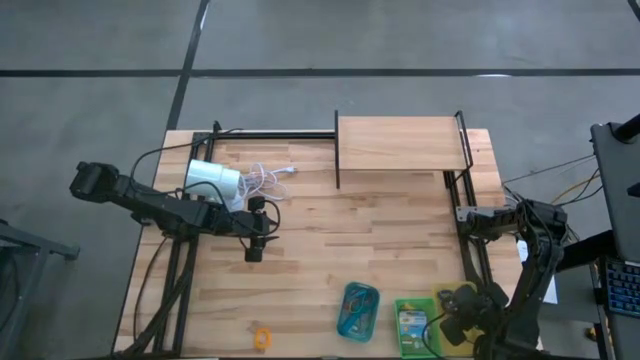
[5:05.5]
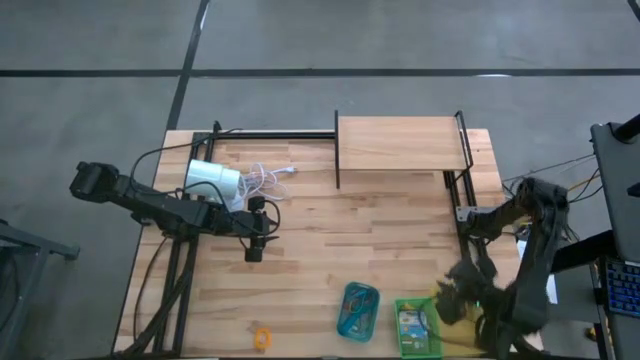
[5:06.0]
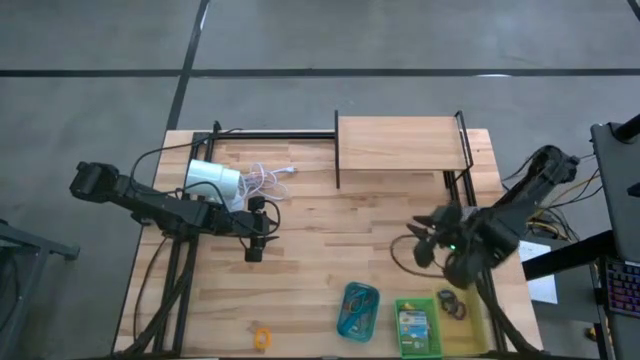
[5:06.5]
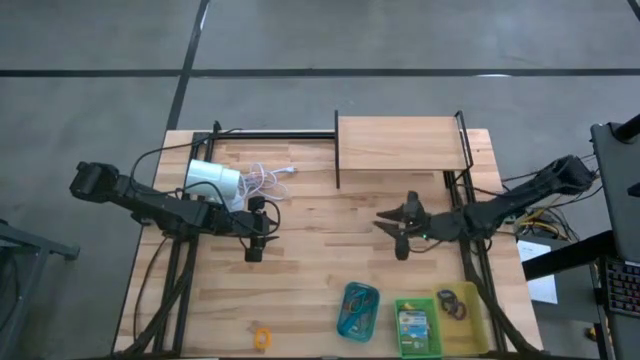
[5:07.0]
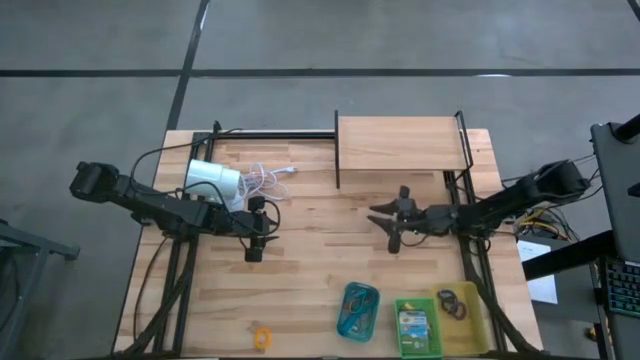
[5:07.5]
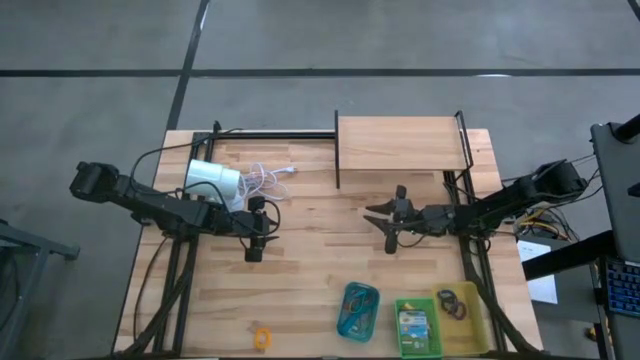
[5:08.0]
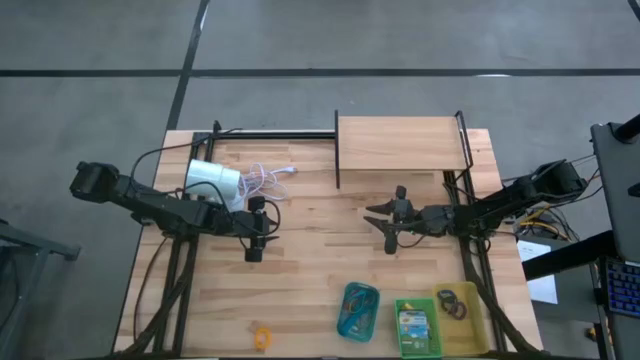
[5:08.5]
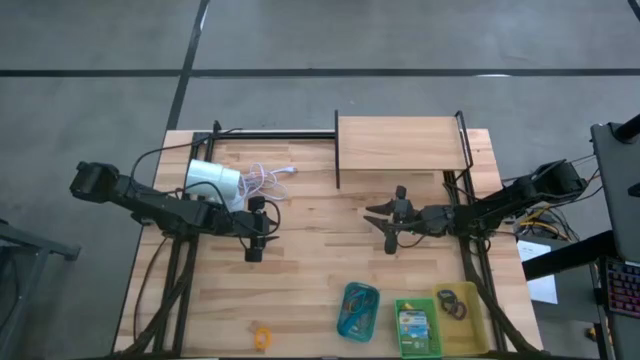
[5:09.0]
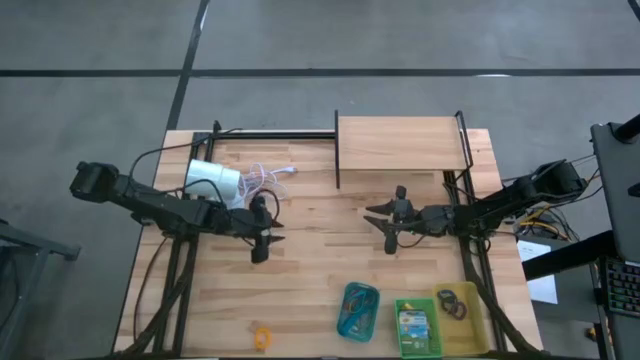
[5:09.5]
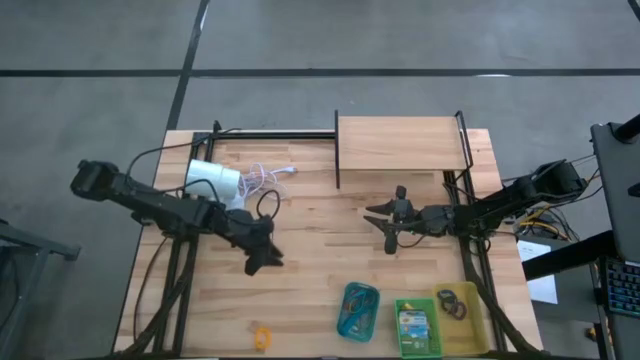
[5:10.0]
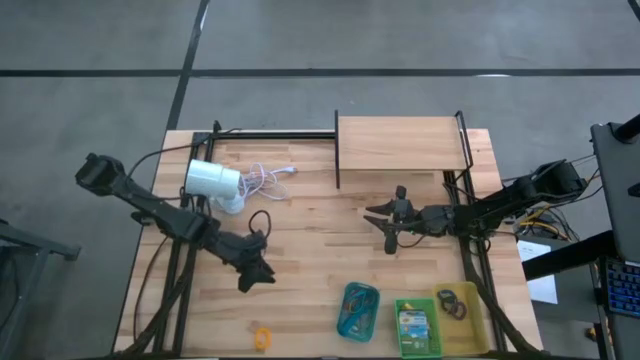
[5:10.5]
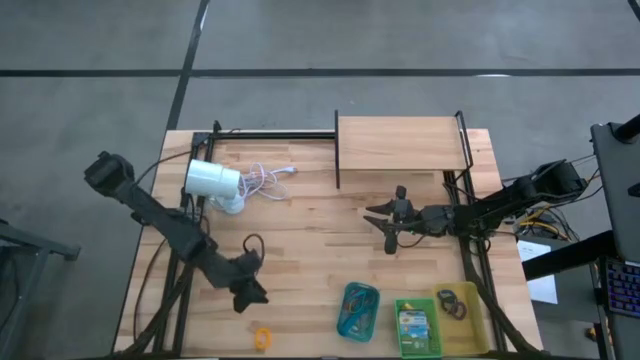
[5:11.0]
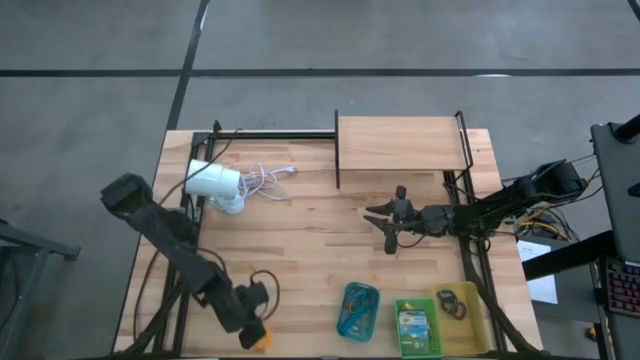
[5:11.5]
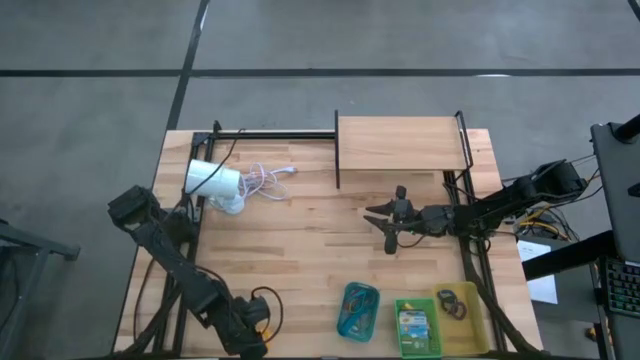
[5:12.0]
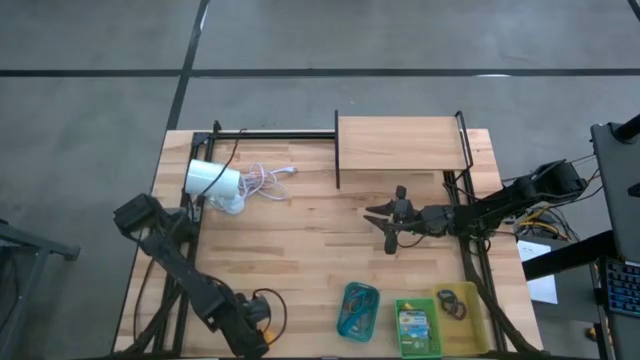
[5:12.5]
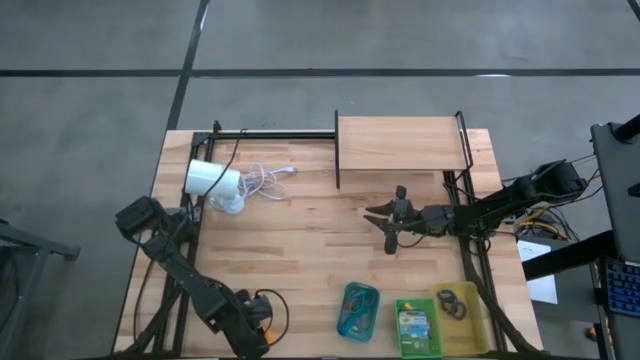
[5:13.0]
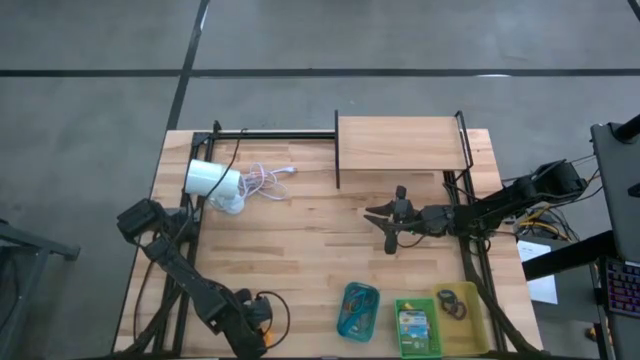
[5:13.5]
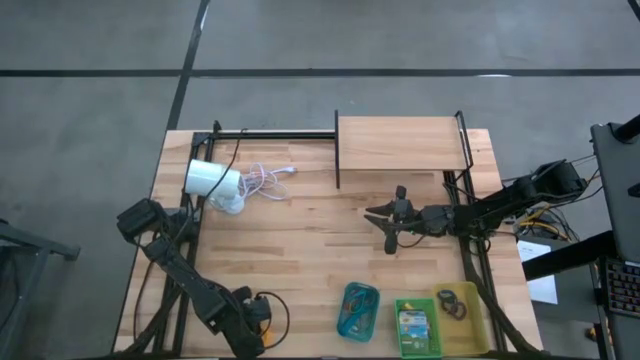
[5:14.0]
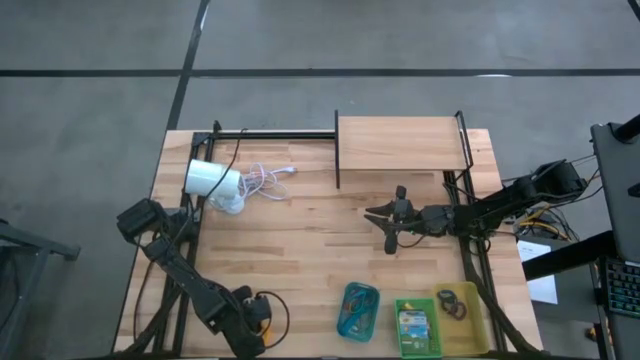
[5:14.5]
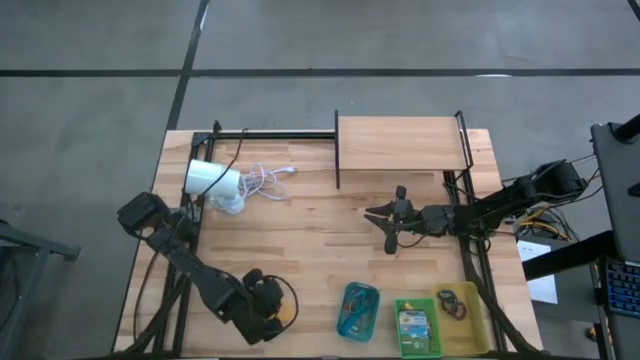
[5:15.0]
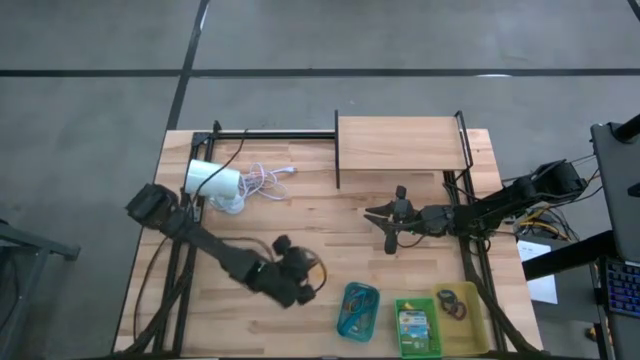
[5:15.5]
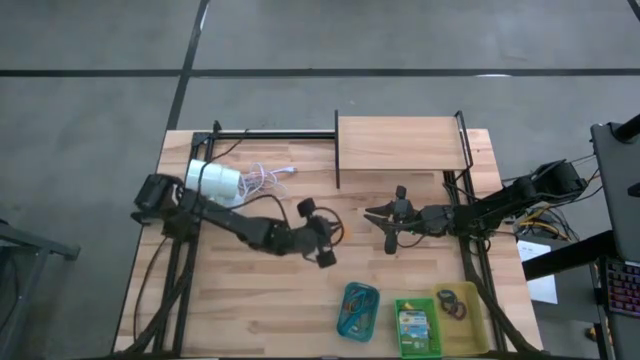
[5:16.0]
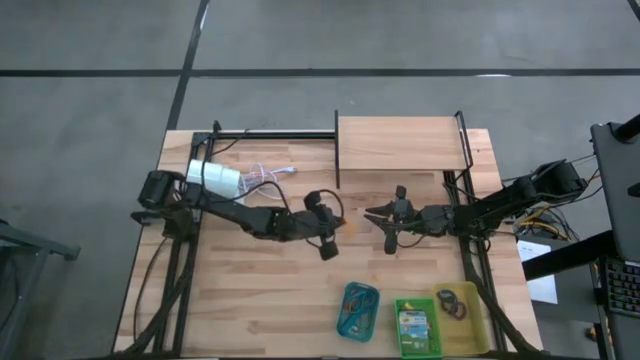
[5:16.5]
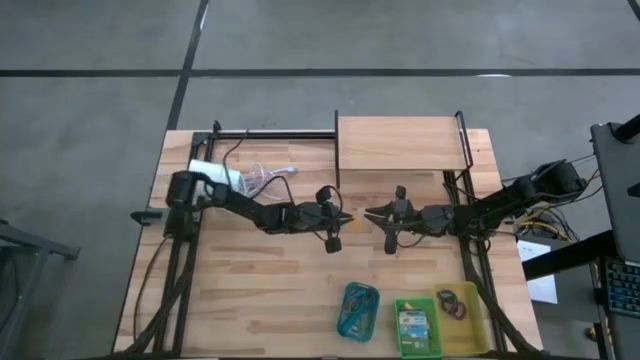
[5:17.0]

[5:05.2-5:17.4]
Task: Pick & Place Office Desk Supplies
Put the yellow spring rubberband into the yellow bin

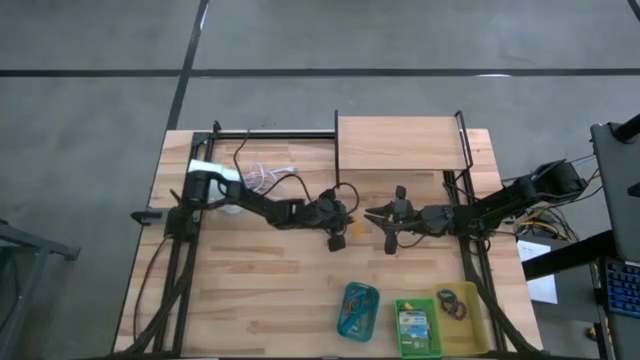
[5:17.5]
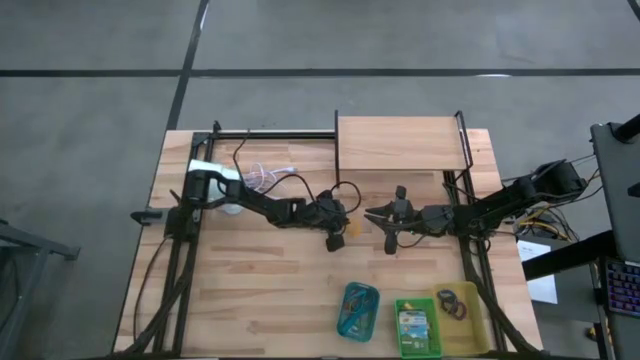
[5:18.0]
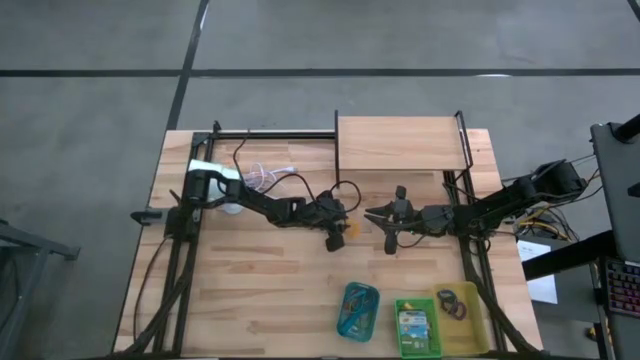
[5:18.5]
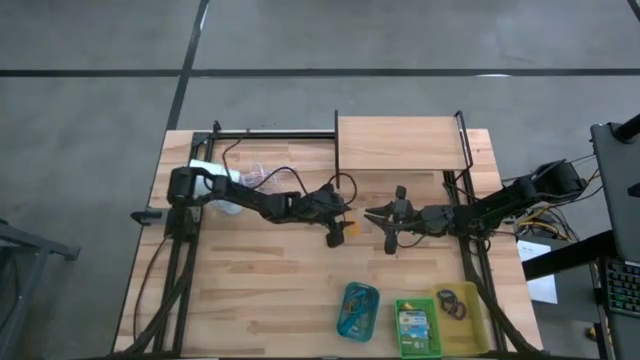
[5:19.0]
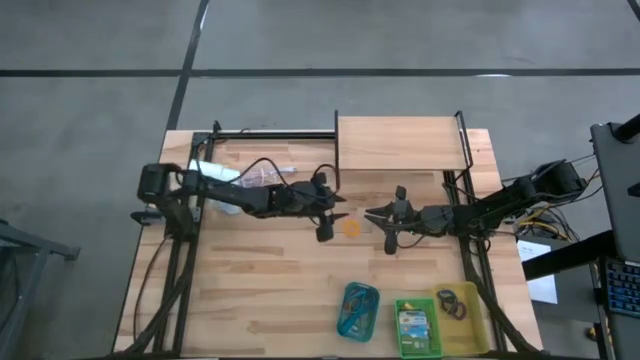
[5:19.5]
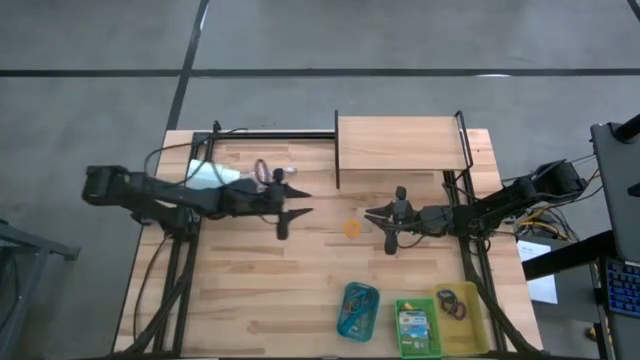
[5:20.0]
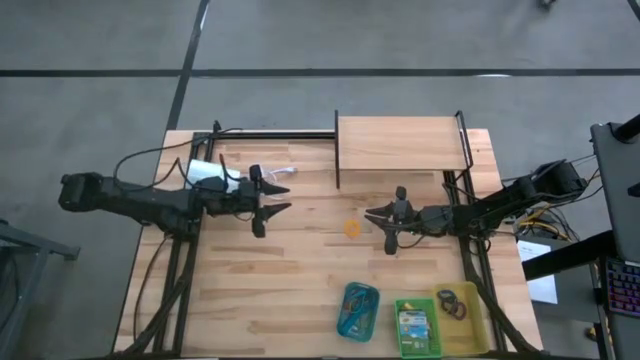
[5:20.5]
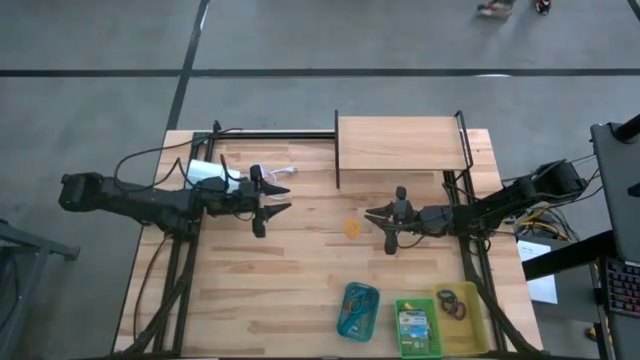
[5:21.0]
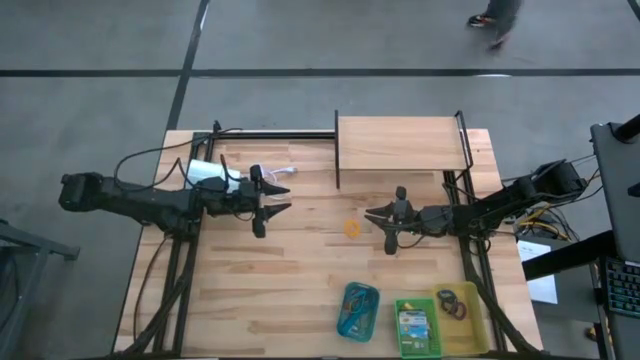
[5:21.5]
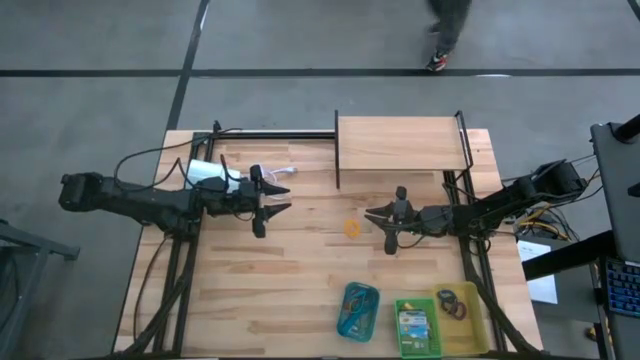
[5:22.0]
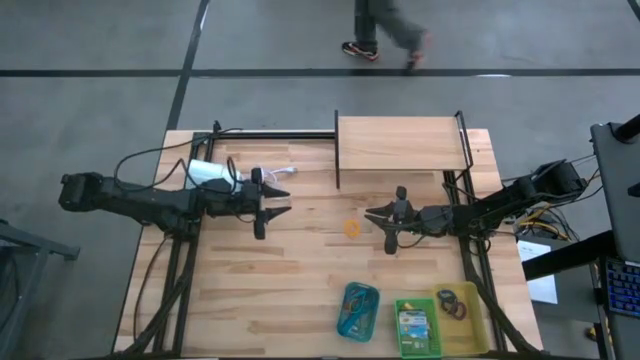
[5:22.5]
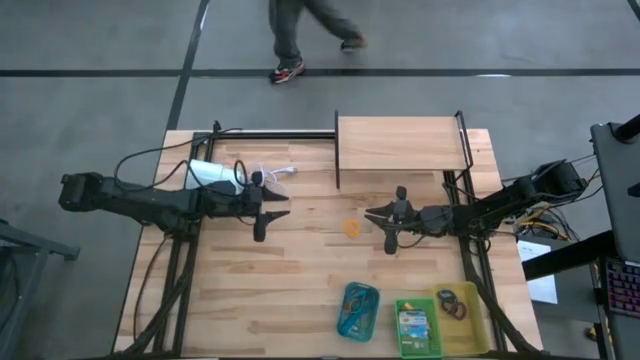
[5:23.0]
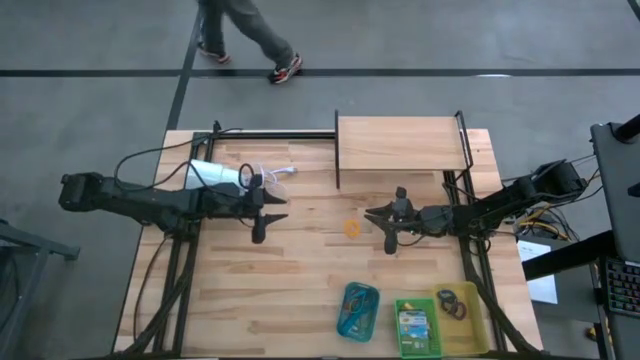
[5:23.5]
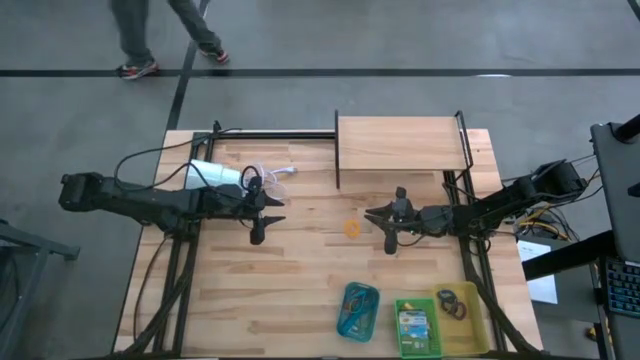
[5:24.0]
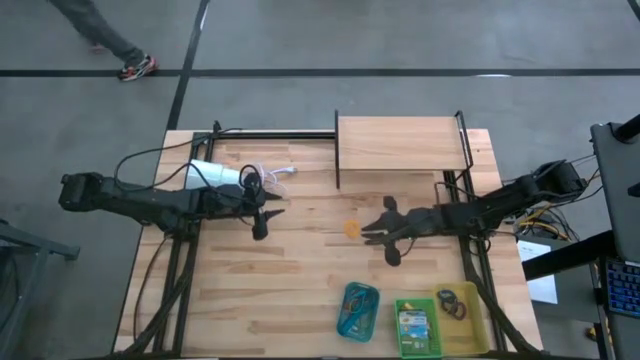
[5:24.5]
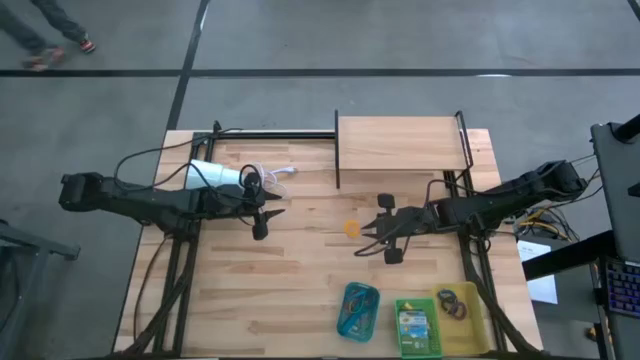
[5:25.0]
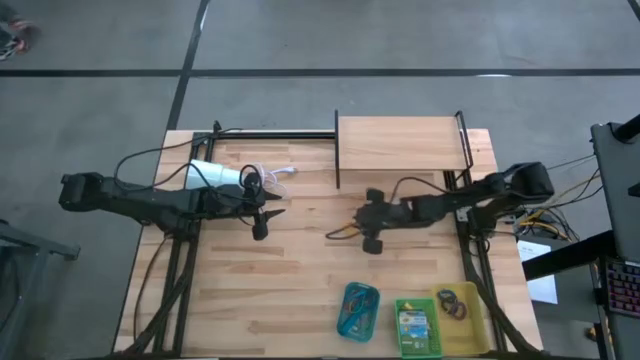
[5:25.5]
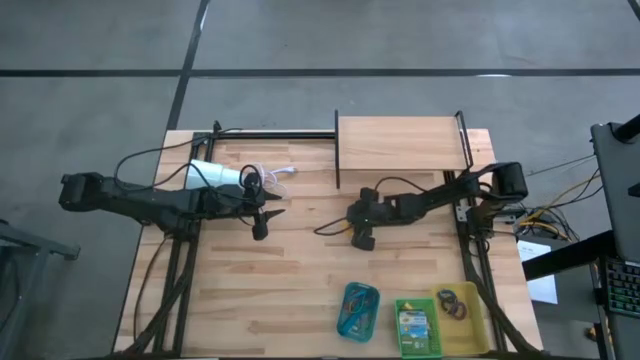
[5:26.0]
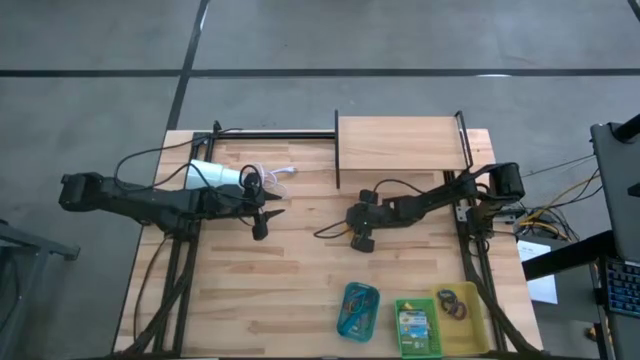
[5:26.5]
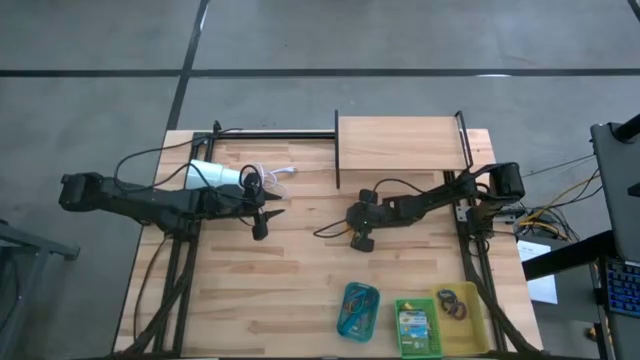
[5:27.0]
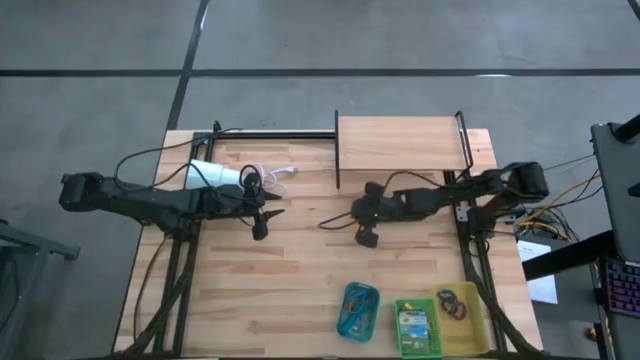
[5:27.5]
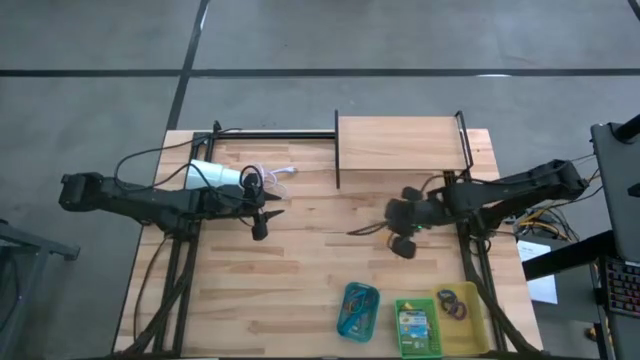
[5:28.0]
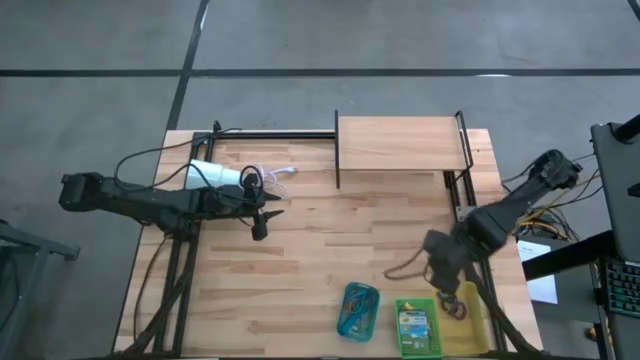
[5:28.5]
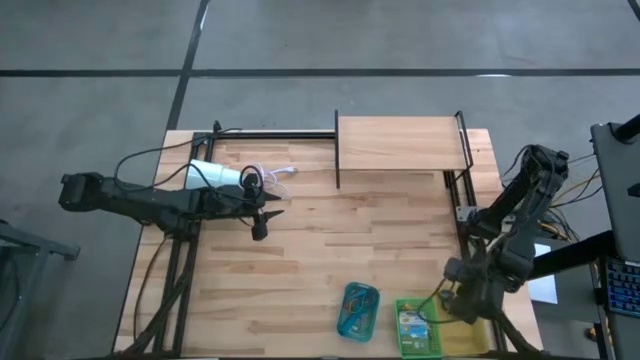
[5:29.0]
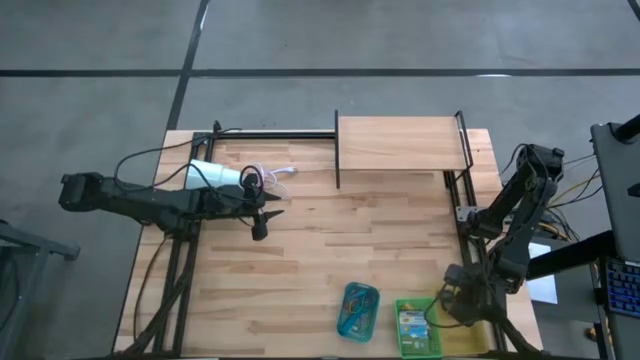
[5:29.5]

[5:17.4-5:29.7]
Put the yellow spring rubberband into the yellow bin
